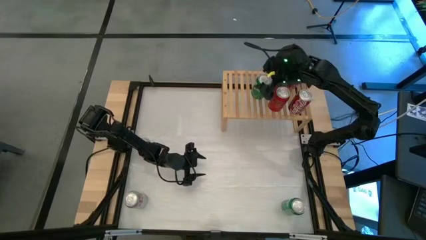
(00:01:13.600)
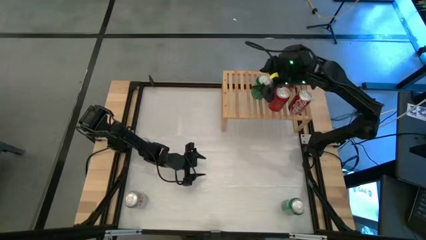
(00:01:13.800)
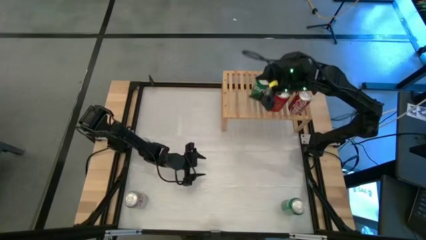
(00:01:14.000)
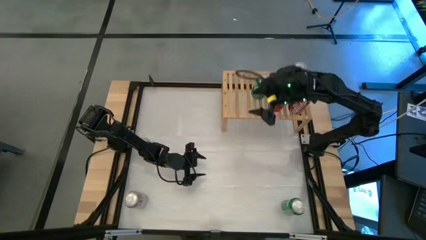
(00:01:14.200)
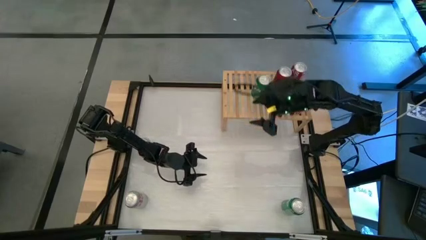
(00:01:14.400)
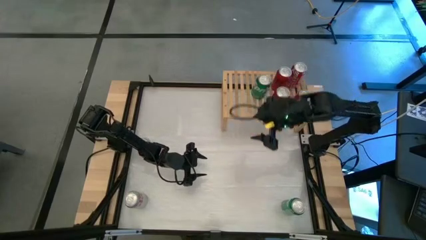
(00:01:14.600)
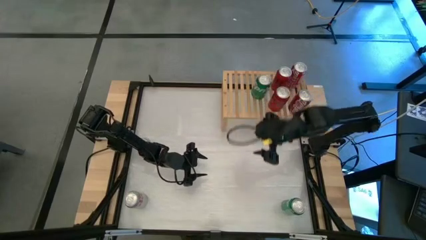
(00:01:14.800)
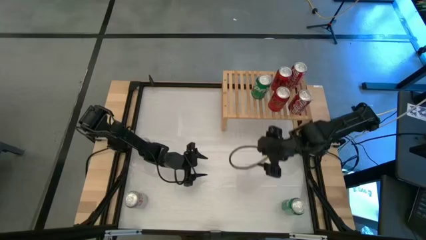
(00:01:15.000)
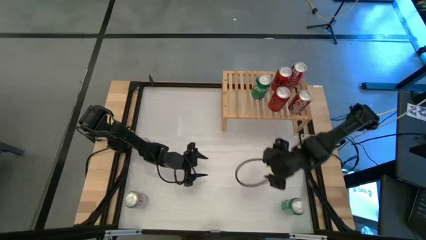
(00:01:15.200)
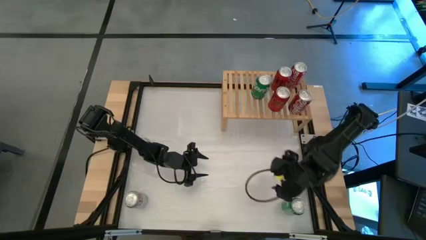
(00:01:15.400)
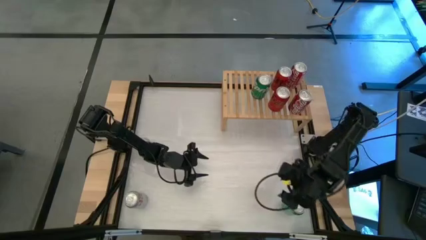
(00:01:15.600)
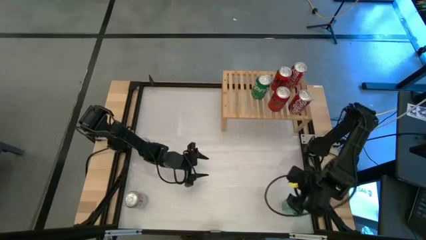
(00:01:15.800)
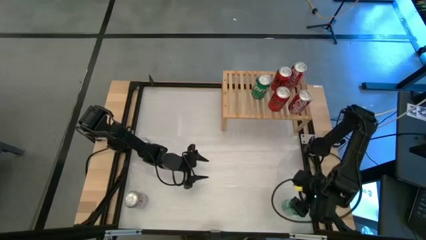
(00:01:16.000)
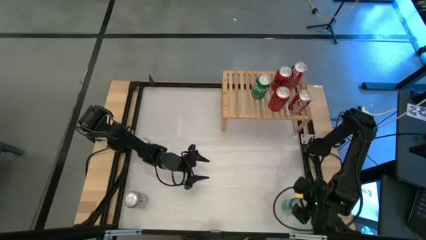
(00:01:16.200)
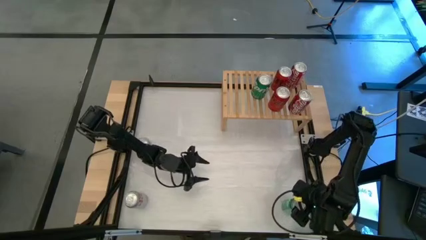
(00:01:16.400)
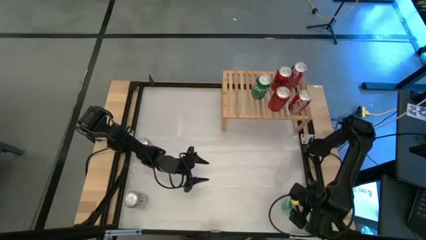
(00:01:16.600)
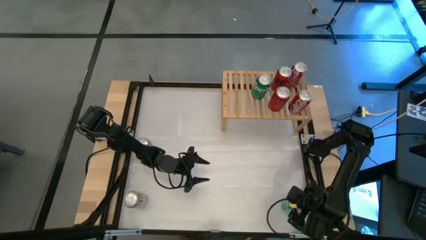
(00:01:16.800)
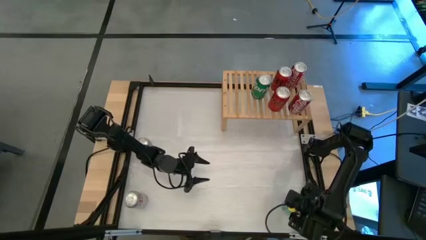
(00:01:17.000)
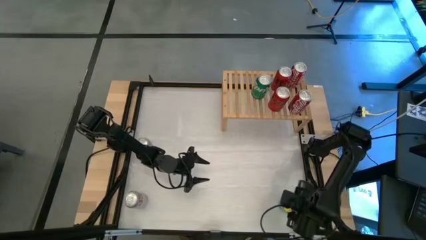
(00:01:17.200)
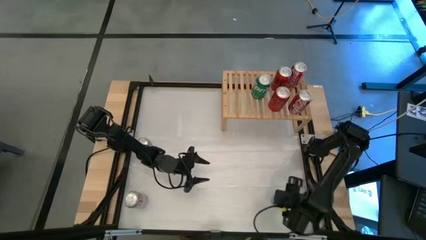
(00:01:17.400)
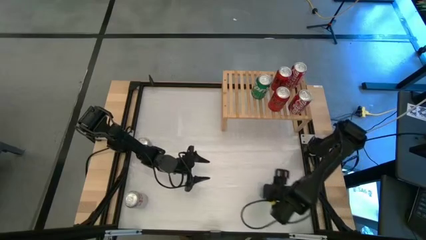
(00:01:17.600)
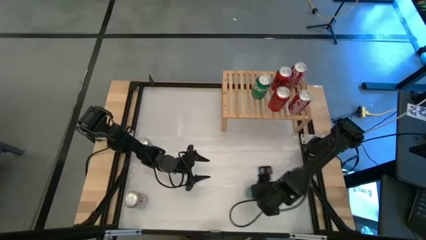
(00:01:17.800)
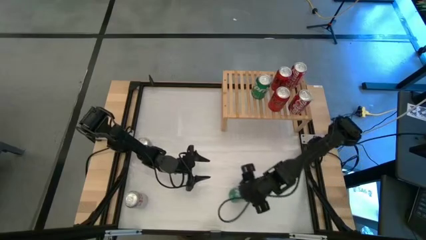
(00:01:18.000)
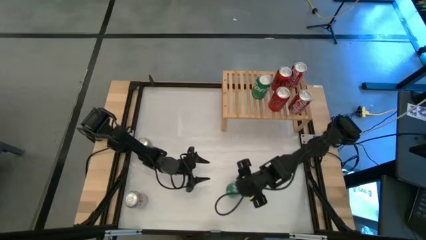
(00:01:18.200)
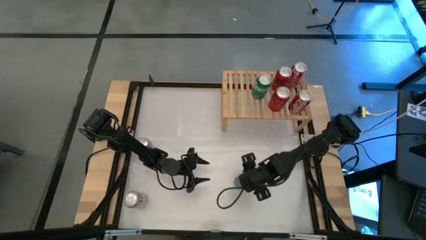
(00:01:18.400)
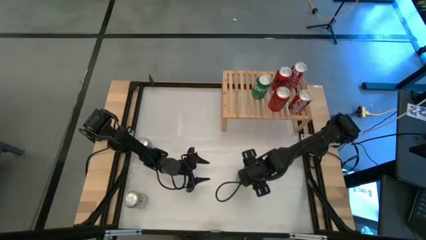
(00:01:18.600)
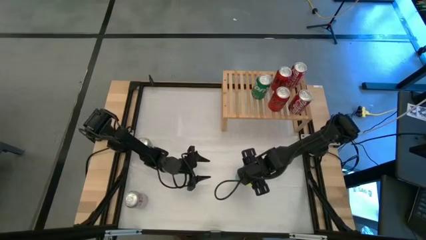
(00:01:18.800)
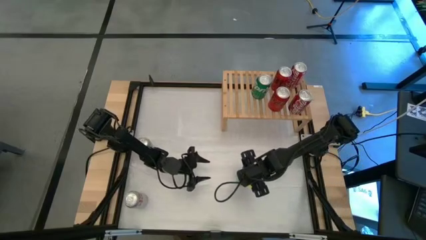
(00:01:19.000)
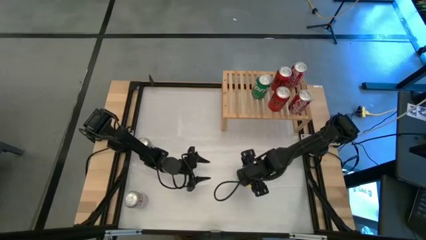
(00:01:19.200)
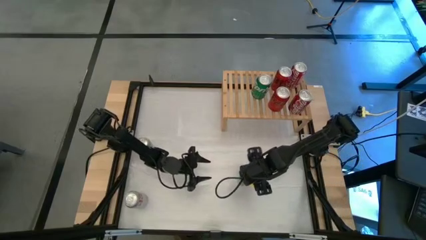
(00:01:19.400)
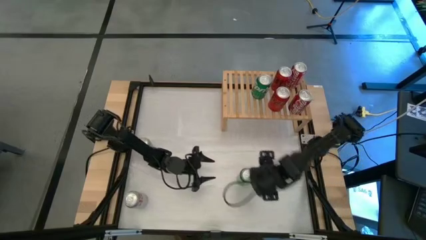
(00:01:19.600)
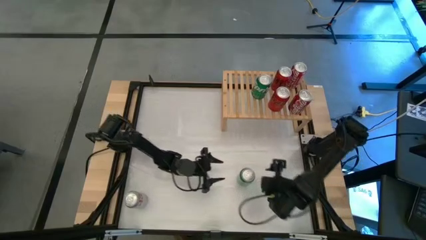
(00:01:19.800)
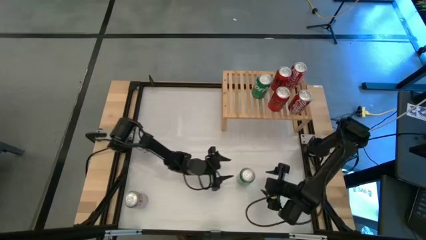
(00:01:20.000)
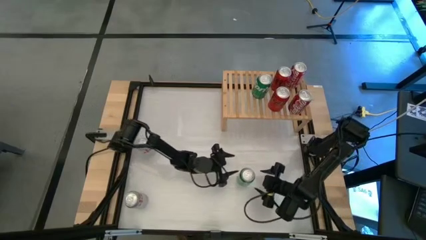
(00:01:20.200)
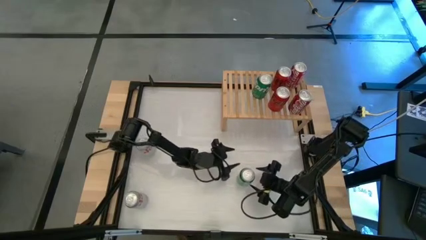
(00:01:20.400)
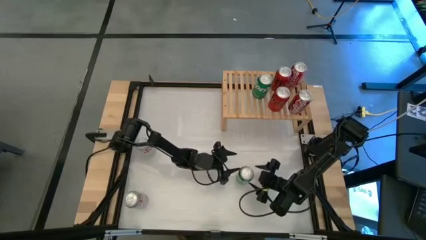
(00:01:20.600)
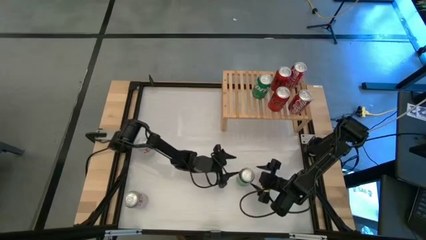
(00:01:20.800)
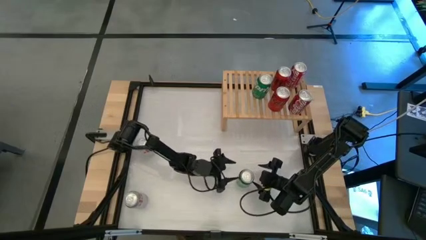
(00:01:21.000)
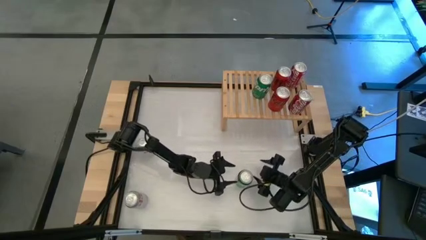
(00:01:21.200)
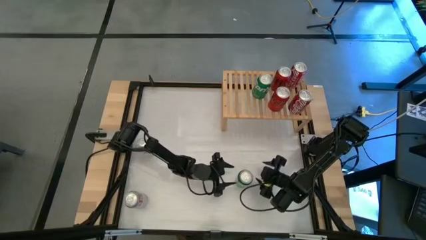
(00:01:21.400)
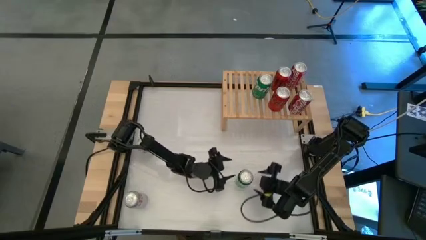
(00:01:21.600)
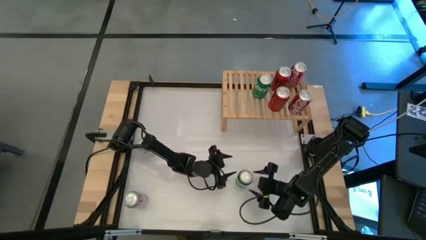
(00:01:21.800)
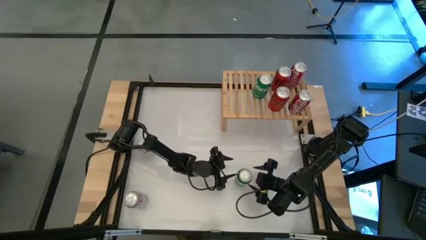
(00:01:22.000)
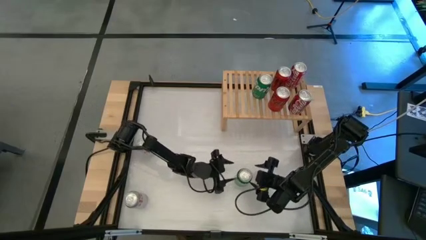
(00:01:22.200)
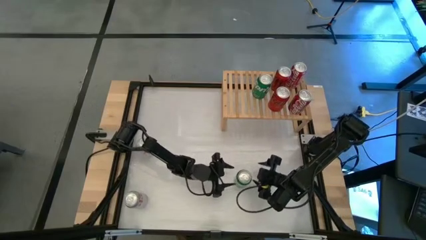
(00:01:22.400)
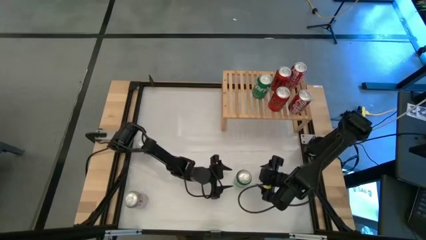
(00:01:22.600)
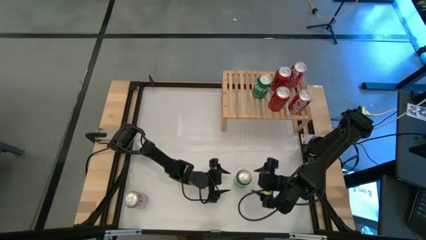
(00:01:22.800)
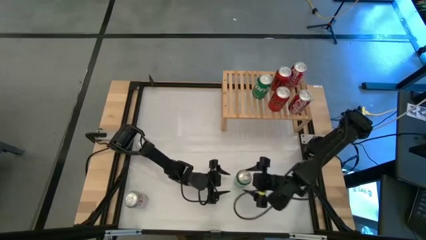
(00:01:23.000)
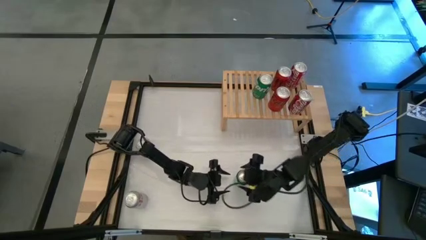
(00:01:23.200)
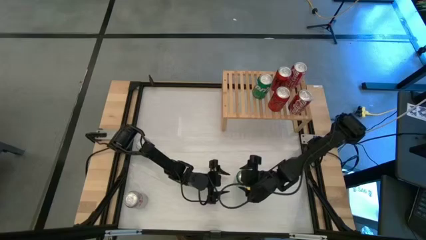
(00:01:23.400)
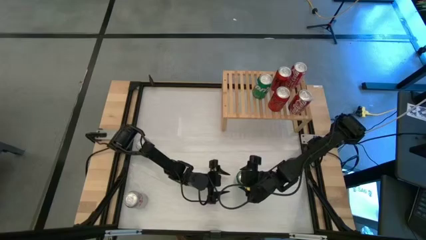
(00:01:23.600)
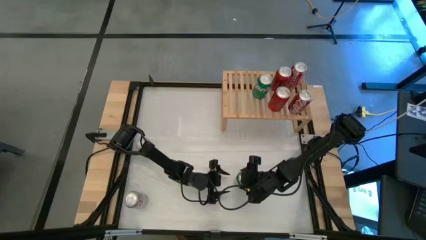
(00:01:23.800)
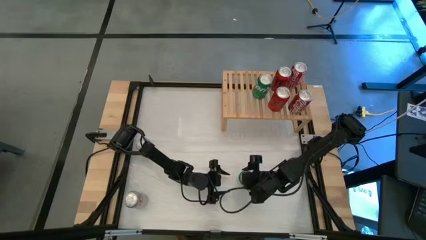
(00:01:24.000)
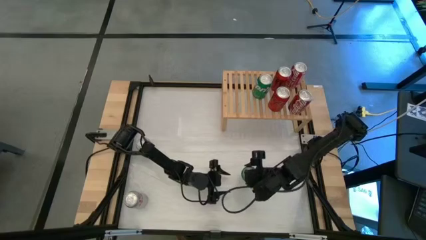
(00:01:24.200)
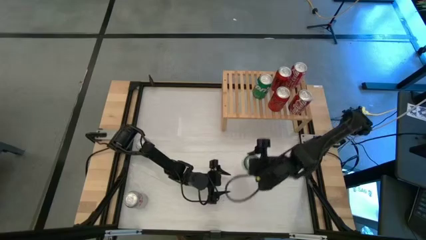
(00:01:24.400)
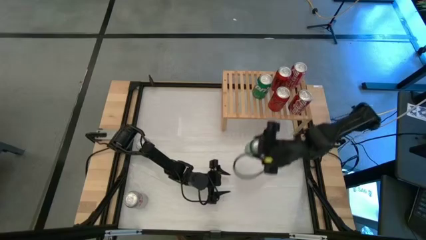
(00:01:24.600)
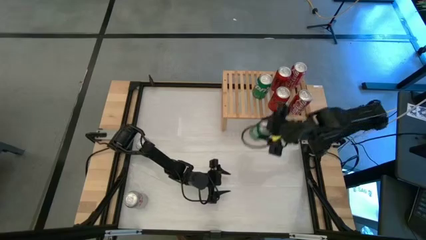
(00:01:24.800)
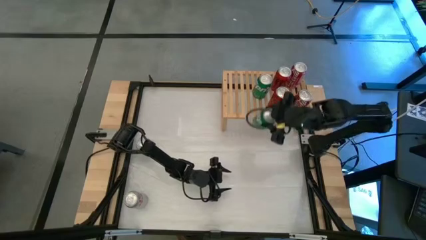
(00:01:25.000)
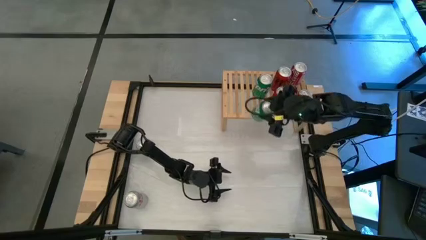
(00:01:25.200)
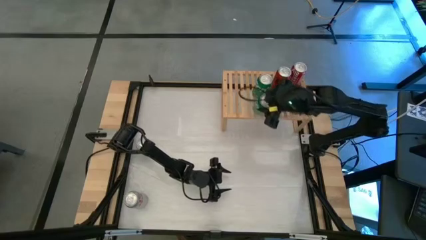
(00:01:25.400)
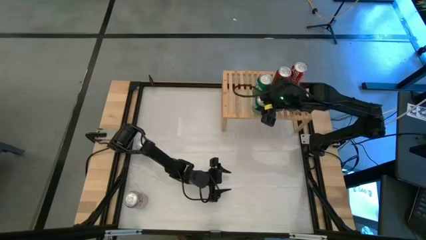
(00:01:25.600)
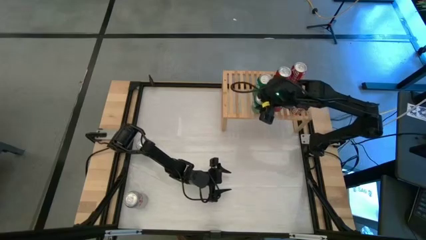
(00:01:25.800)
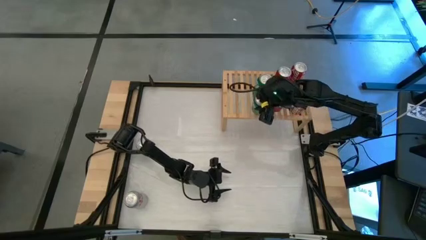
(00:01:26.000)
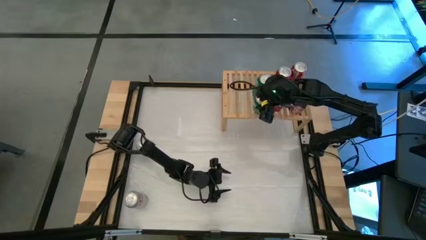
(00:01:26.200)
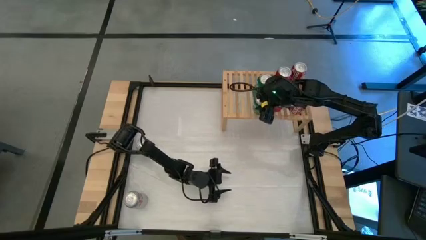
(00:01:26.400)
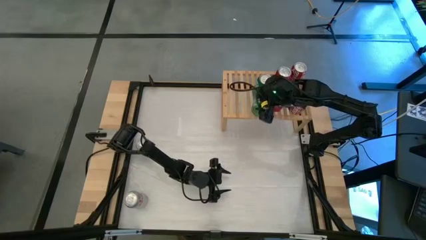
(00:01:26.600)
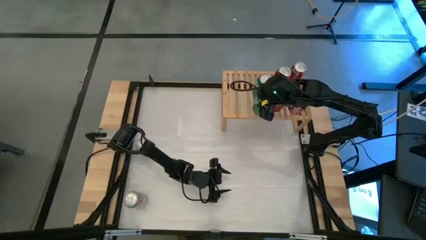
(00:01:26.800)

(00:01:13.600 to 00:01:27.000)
Task: Place canned beverage on shelf
Put the green soda can on the shelf aligned with the other green soda can

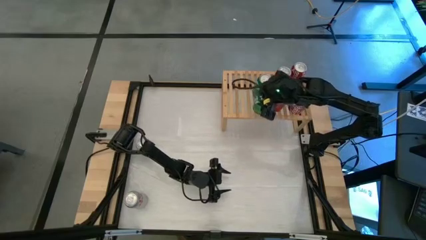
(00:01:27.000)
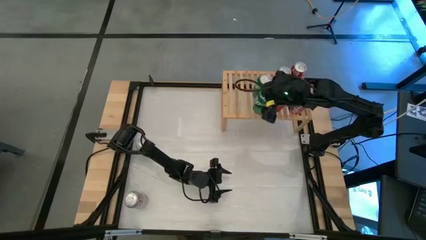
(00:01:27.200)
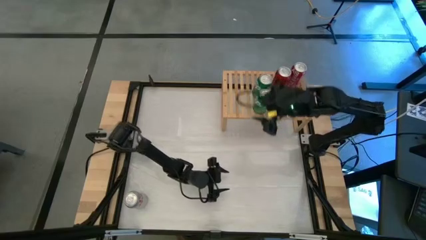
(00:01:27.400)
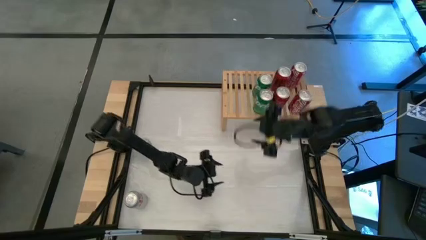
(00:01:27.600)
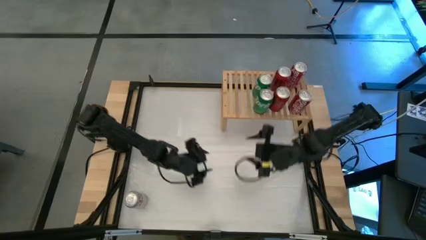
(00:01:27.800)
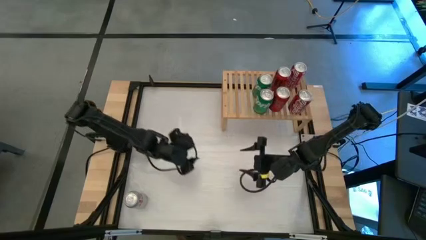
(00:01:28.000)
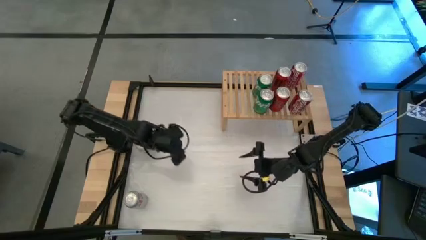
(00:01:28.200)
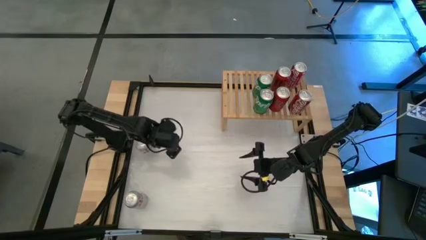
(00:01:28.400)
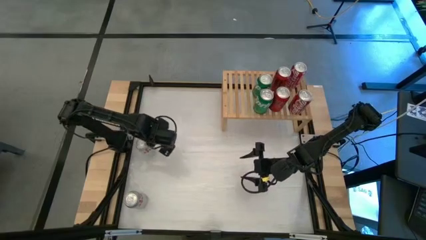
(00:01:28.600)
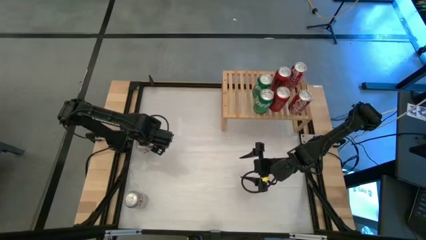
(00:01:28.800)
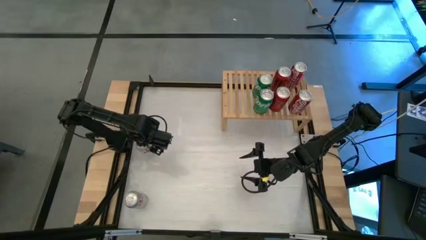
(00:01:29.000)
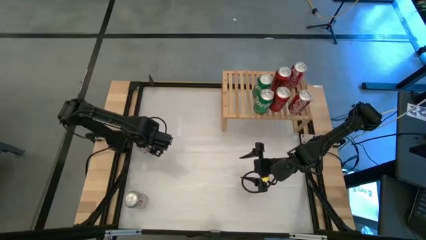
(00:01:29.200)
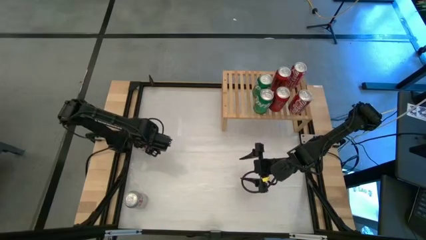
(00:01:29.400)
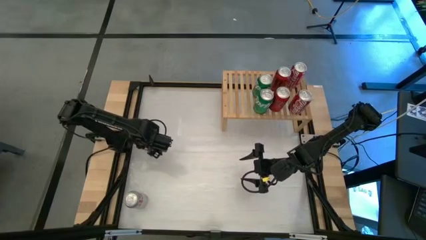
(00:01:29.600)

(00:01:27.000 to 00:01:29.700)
Put the top silver soda can on the shelf
